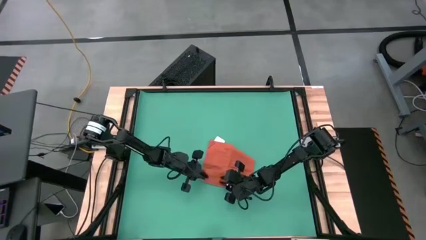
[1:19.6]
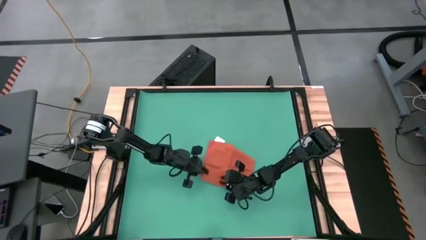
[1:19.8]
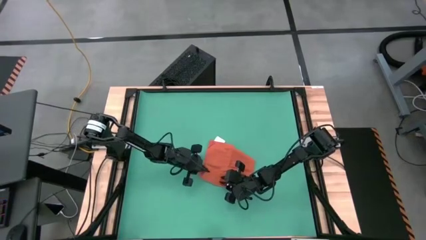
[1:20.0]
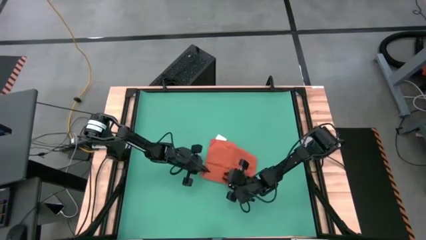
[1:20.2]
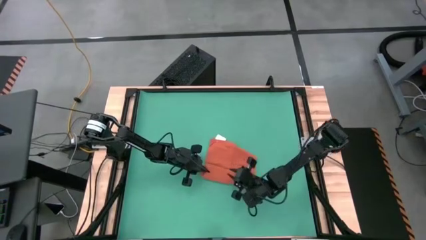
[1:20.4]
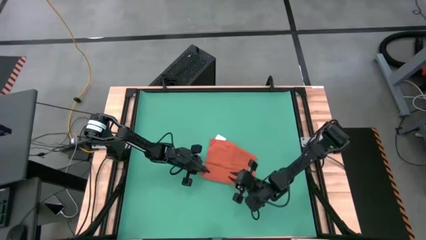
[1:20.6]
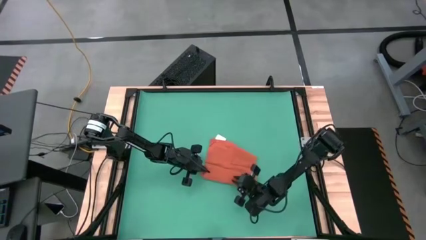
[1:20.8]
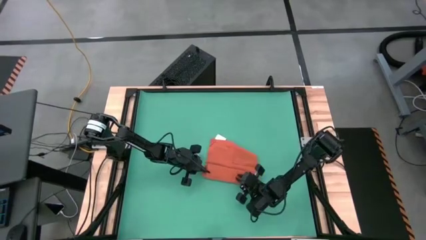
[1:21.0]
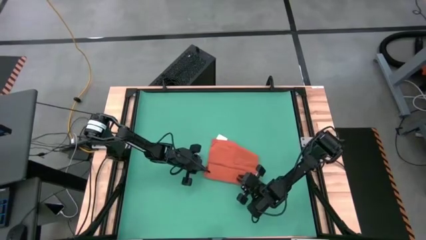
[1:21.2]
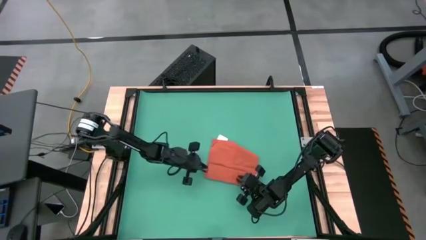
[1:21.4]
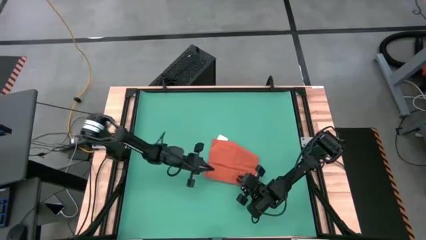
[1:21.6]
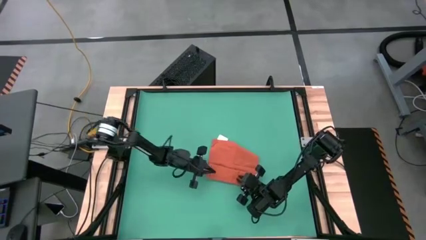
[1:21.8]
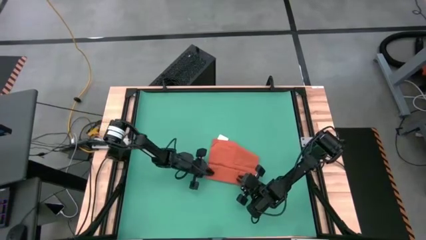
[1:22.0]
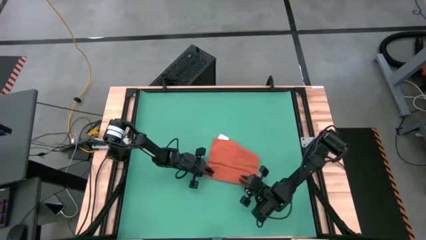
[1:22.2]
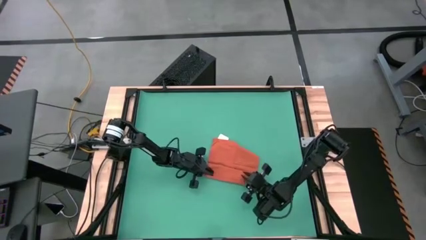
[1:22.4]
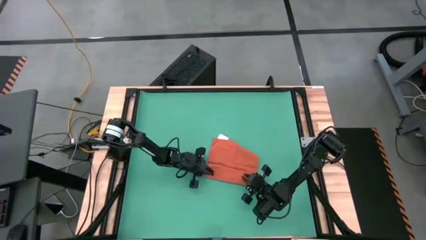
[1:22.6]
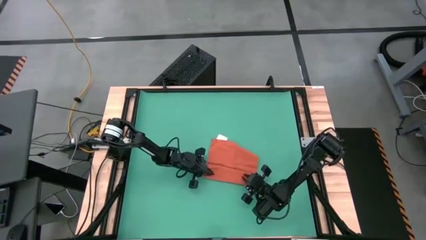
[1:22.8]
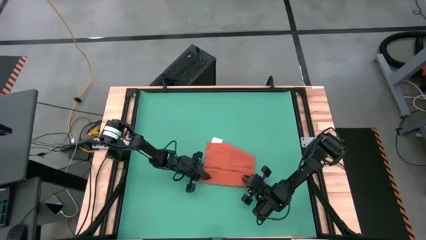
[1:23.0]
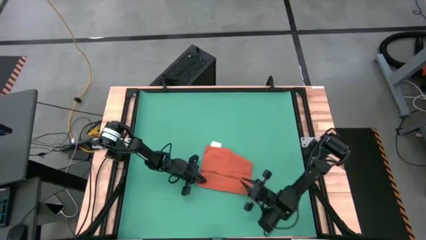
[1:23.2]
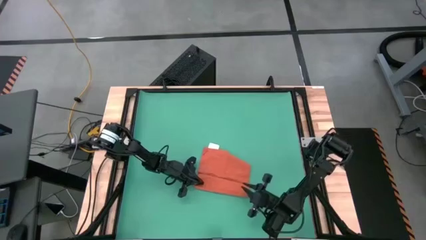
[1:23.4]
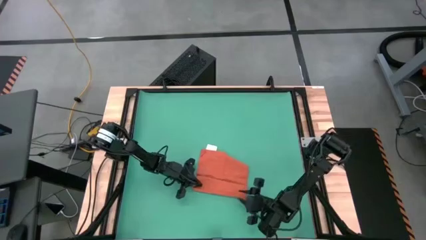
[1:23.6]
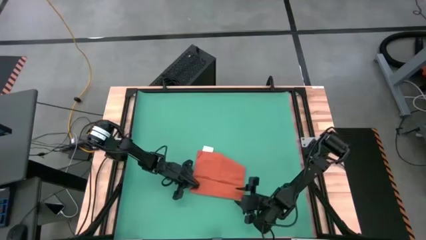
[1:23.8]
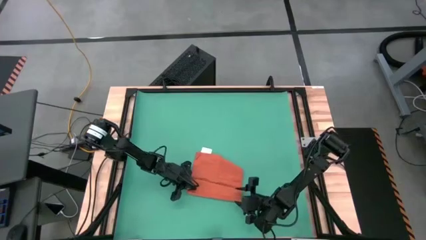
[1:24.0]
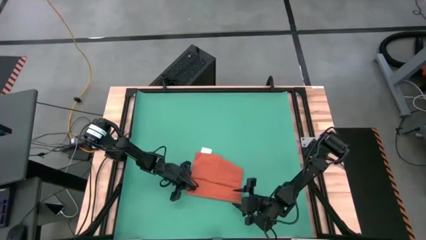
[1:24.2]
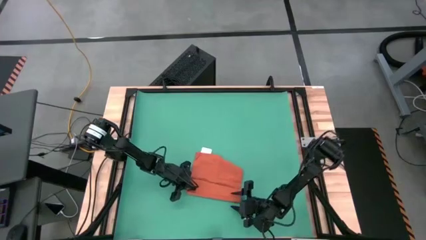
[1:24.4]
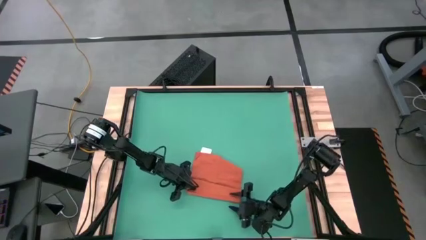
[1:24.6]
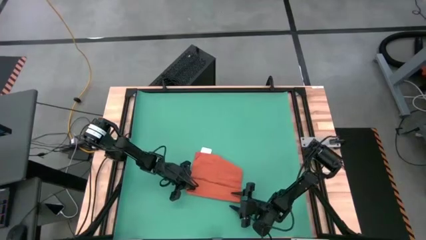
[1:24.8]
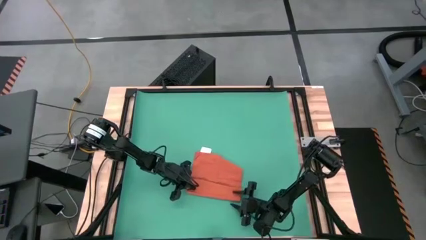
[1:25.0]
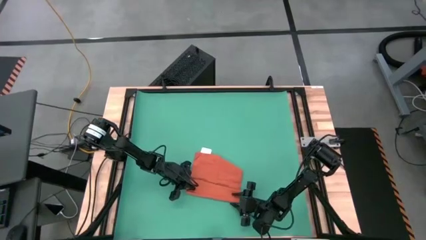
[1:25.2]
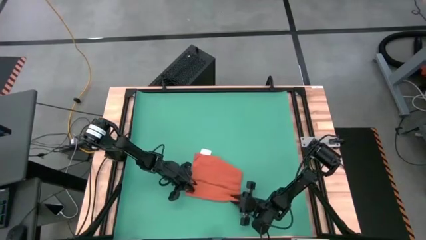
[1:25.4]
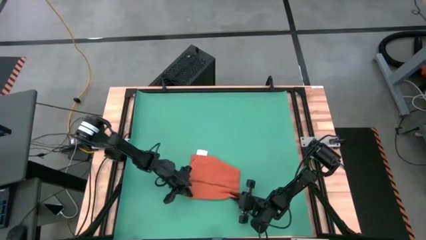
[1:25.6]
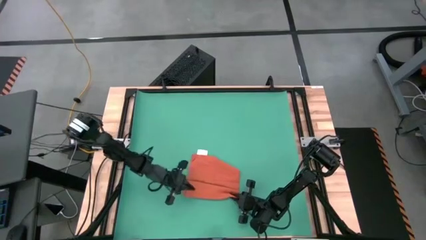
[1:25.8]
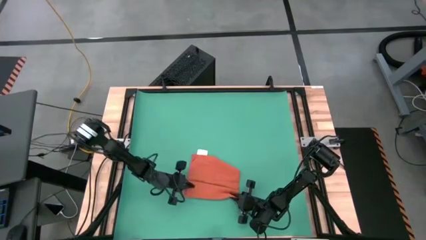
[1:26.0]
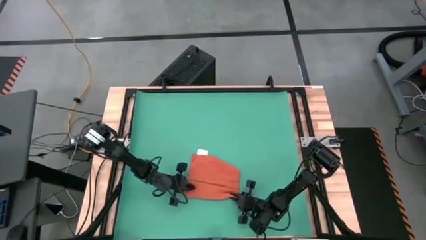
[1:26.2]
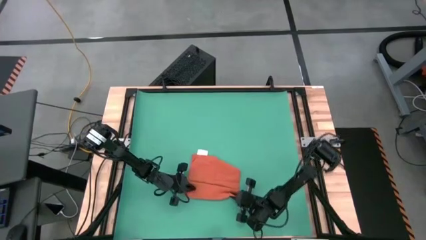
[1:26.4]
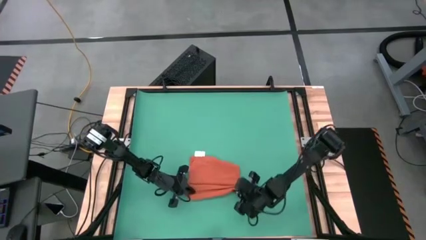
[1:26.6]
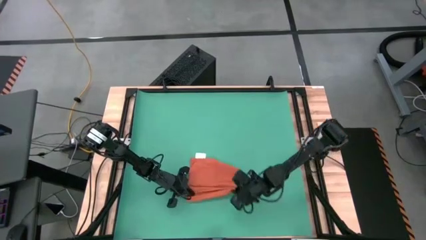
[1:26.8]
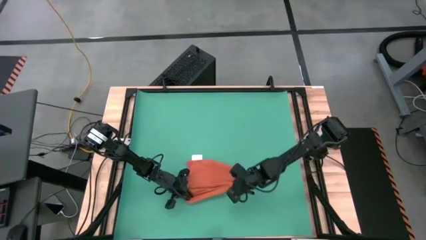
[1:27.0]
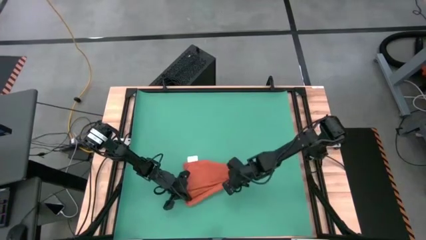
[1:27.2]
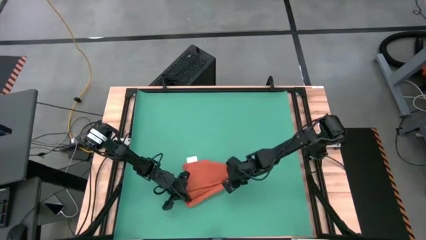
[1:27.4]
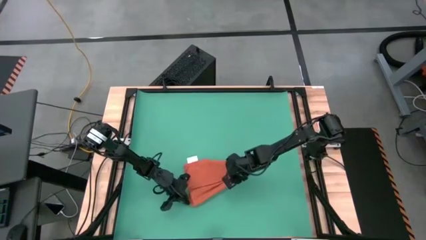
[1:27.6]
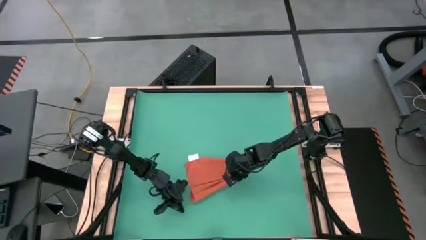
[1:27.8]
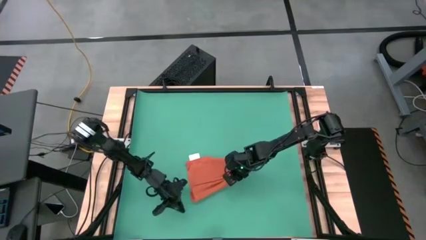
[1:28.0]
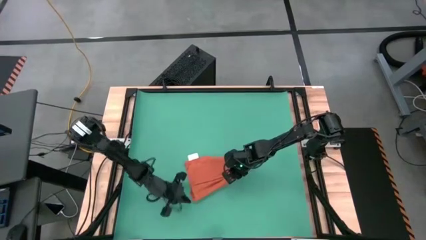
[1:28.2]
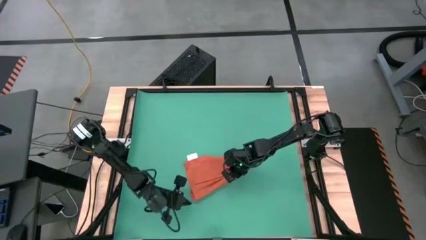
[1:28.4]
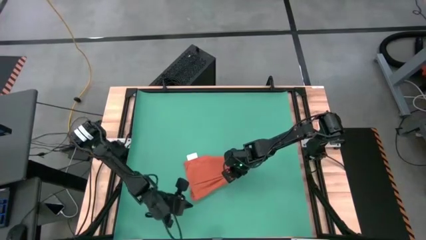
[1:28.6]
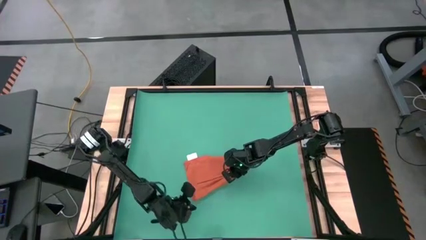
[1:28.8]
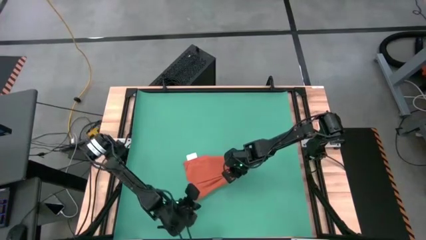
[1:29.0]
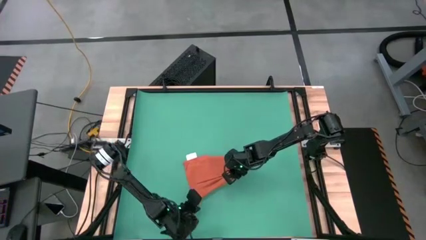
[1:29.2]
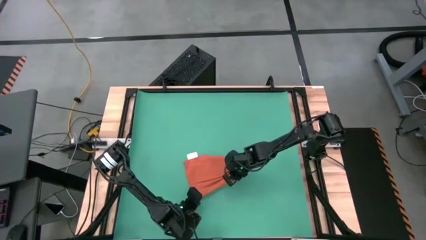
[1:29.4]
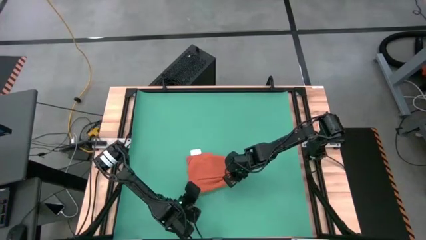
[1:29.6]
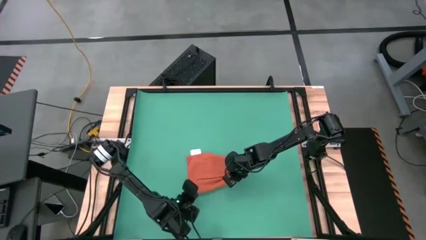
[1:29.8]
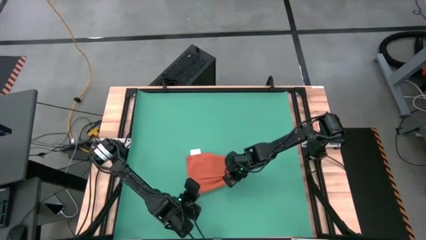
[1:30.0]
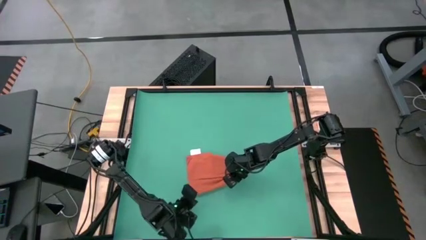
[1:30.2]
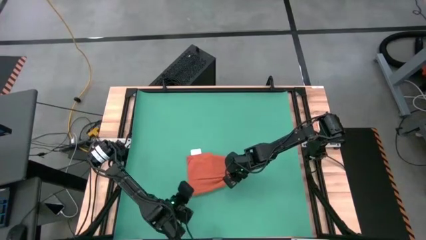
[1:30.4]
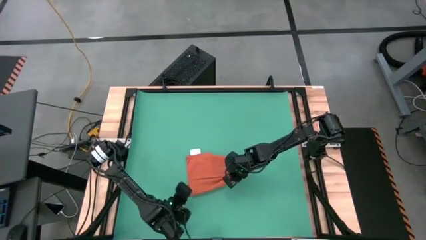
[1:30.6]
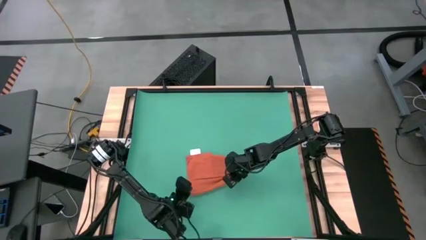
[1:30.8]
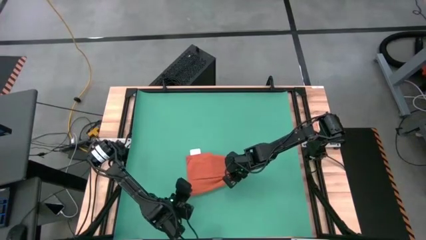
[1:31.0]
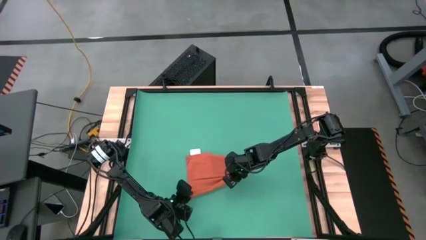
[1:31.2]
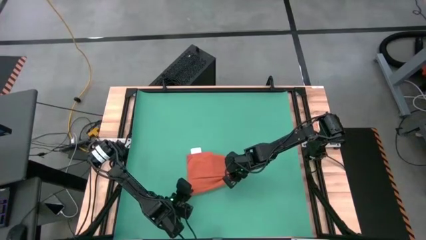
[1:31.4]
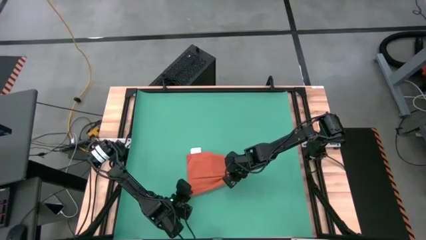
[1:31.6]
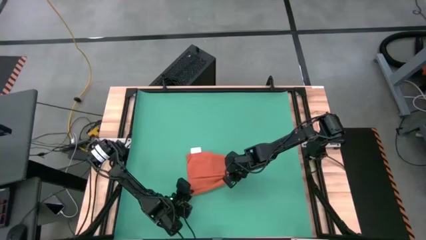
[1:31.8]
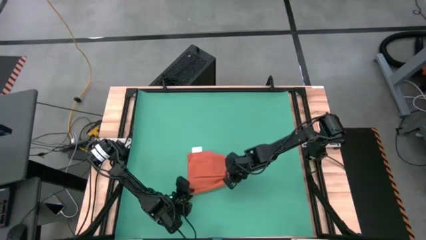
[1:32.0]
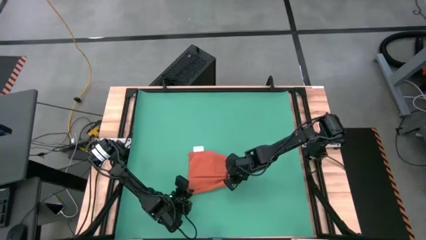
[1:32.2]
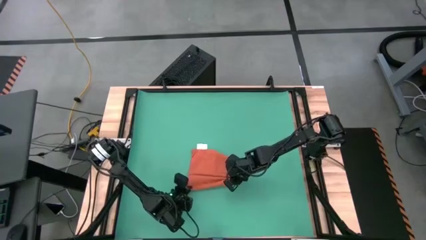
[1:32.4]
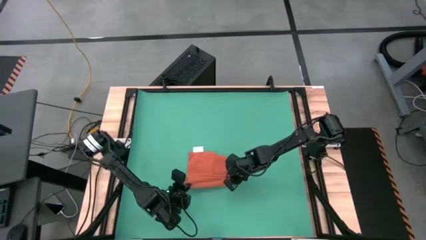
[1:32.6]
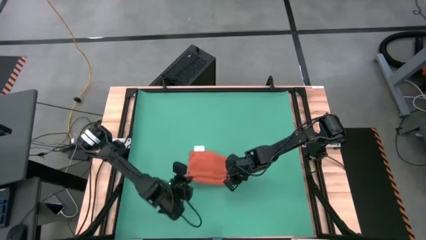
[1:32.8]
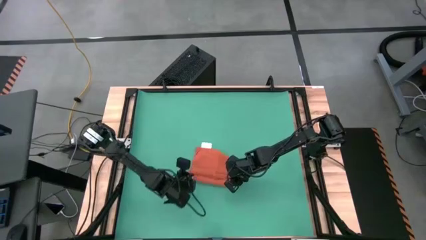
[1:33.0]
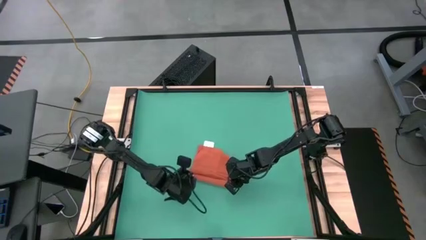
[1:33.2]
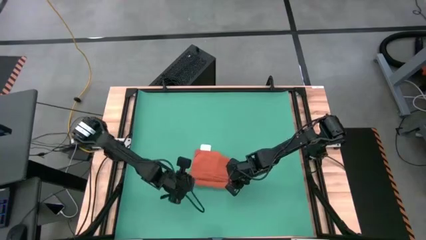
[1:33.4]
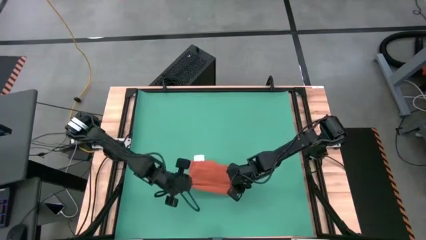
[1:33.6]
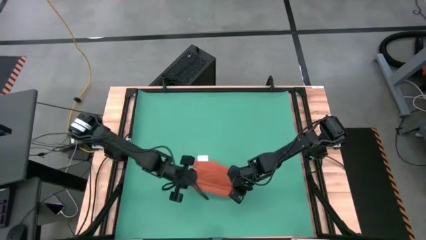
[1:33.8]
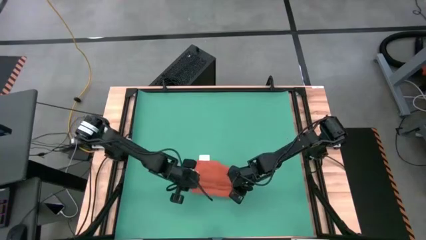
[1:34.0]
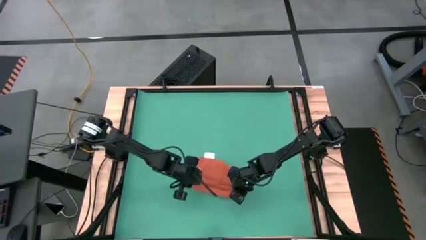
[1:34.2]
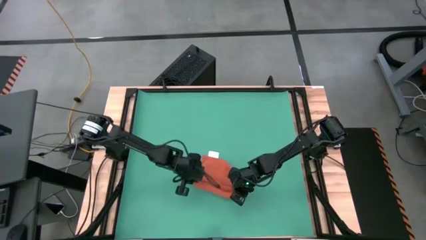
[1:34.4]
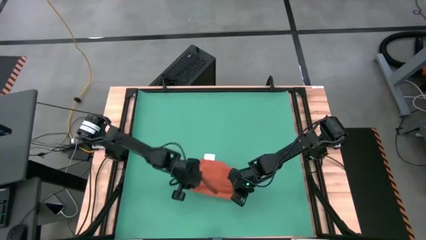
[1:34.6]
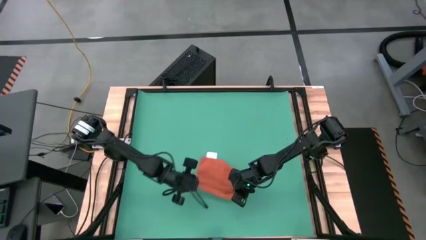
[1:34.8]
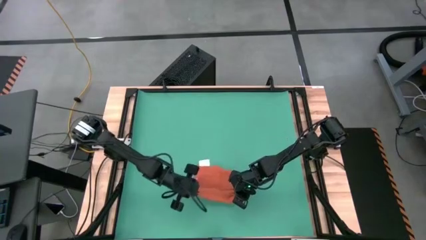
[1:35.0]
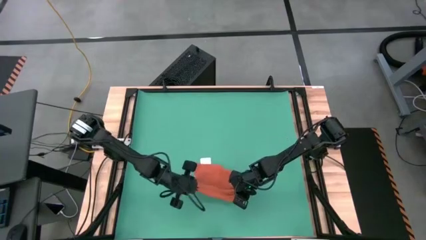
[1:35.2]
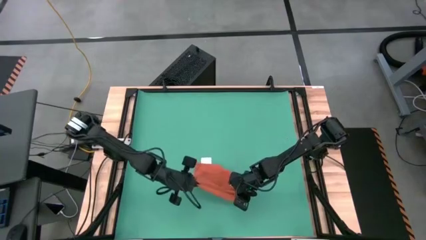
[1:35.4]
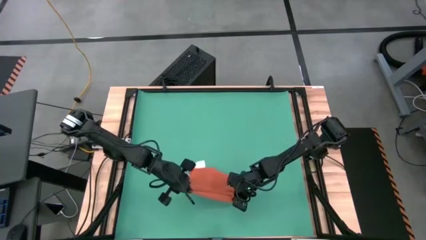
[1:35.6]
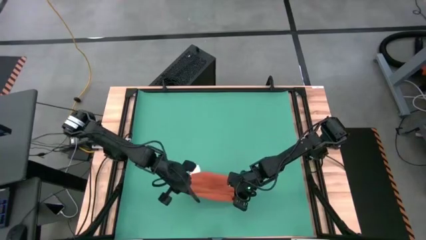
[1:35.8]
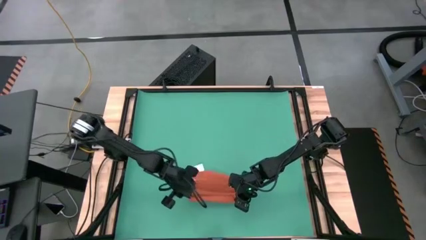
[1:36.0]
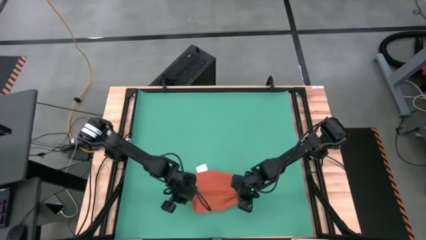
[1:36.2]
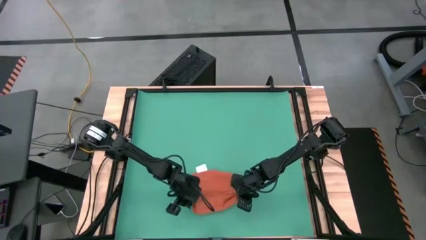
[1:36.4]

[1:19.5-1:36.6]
Task: Roll towel into tight, uniform cylinder
Roll the orange towel
